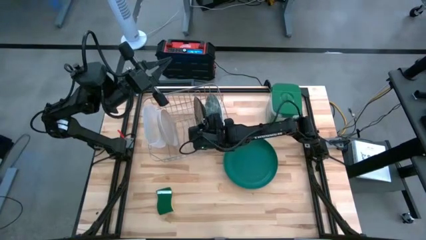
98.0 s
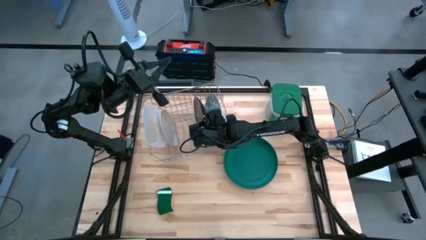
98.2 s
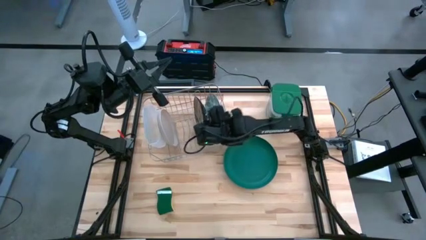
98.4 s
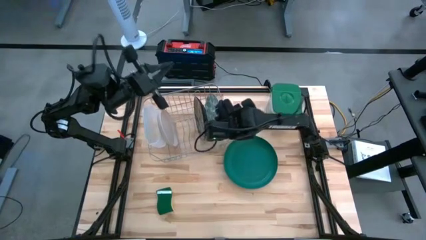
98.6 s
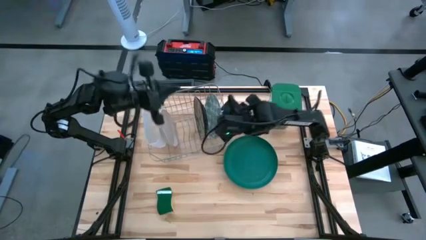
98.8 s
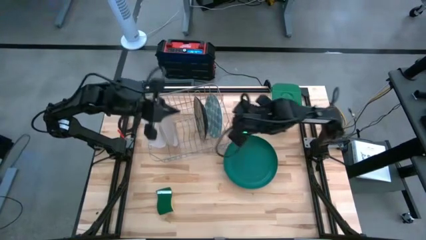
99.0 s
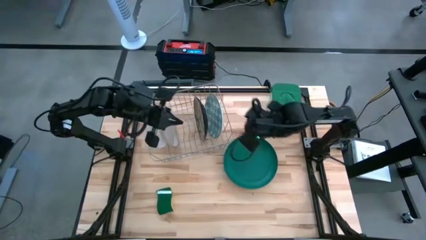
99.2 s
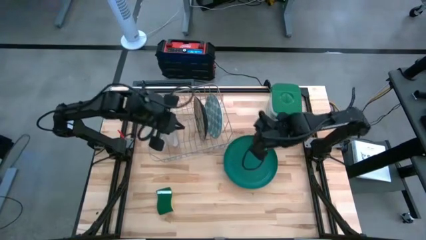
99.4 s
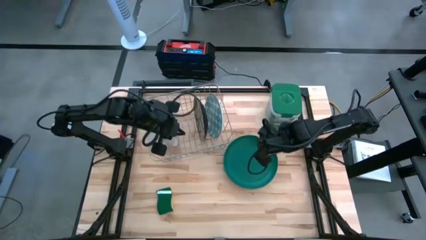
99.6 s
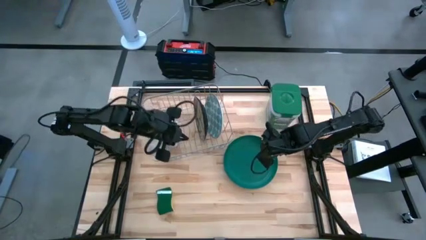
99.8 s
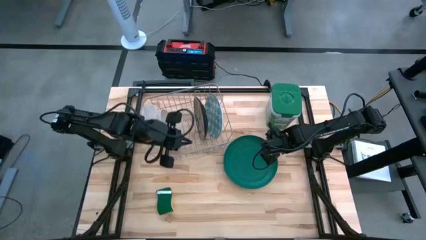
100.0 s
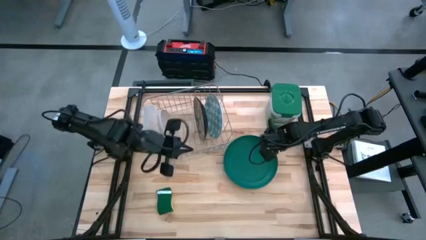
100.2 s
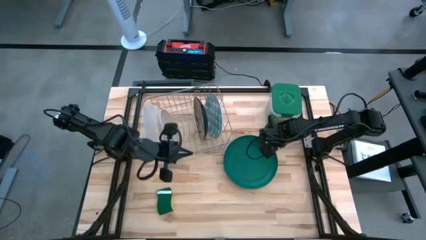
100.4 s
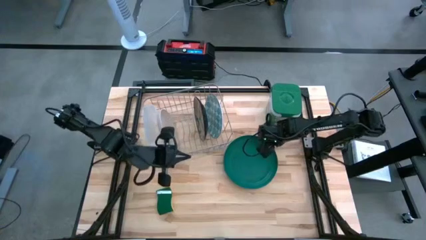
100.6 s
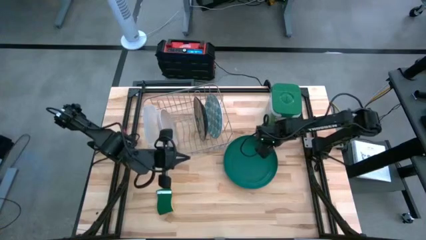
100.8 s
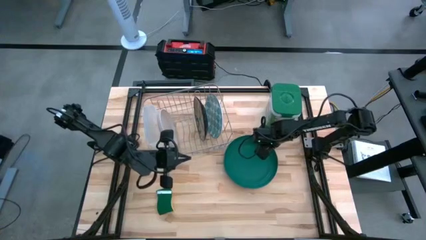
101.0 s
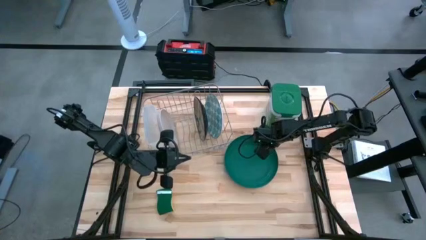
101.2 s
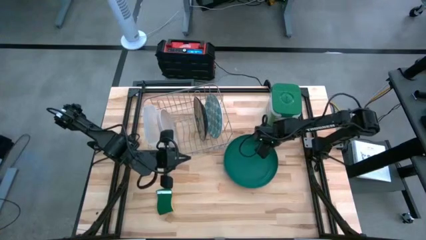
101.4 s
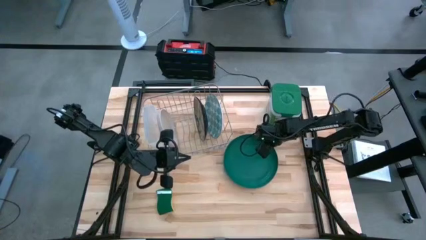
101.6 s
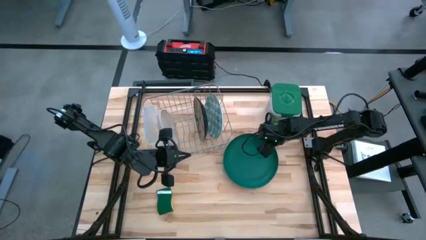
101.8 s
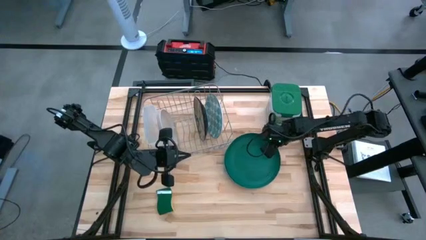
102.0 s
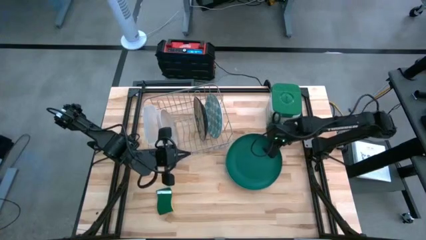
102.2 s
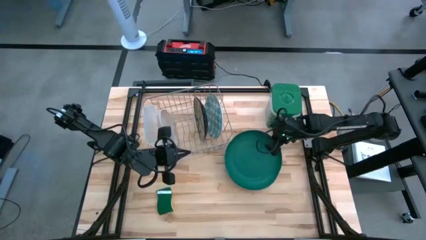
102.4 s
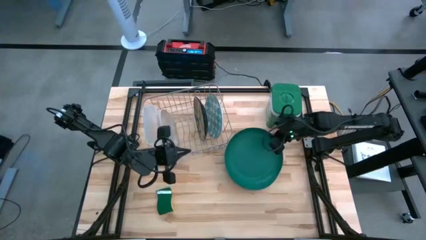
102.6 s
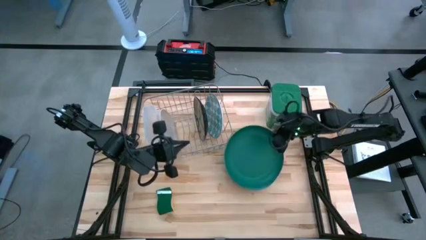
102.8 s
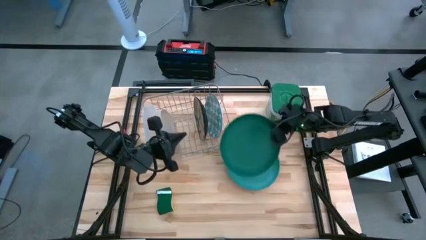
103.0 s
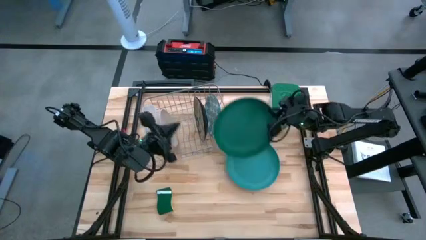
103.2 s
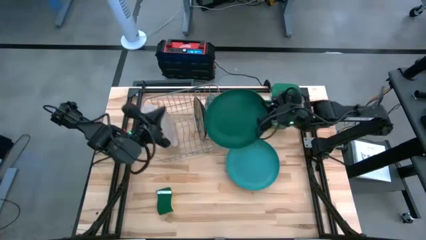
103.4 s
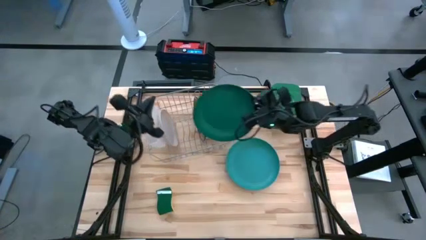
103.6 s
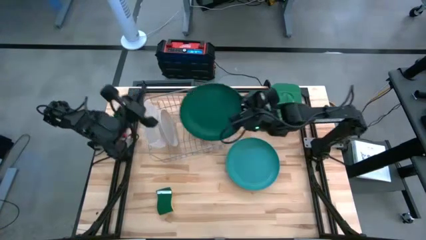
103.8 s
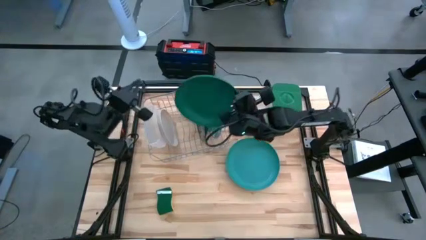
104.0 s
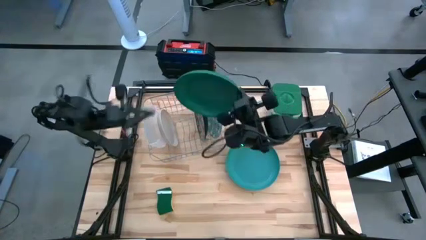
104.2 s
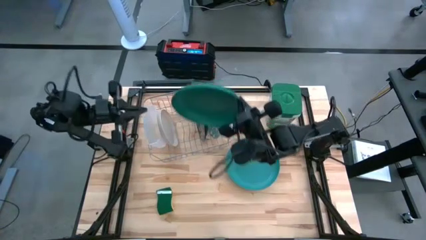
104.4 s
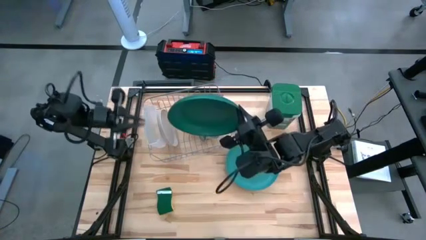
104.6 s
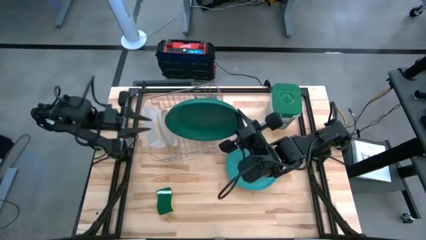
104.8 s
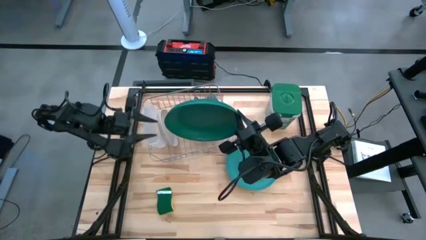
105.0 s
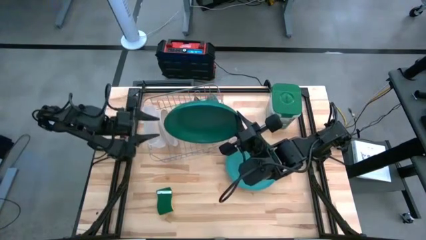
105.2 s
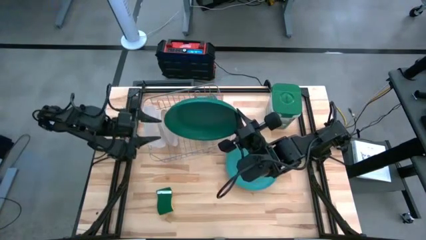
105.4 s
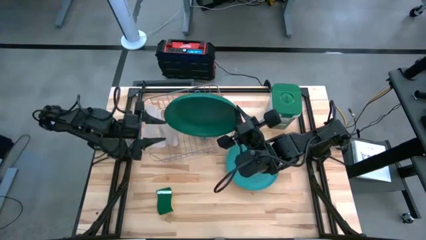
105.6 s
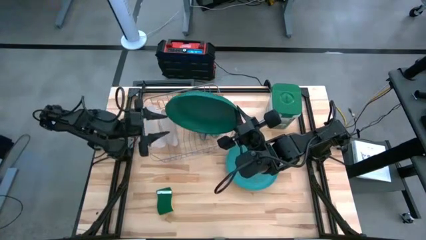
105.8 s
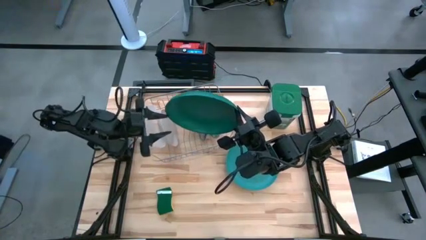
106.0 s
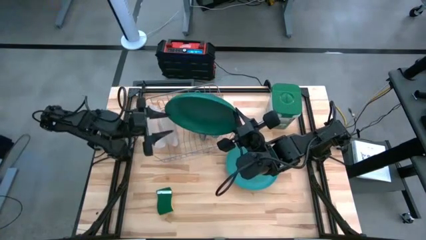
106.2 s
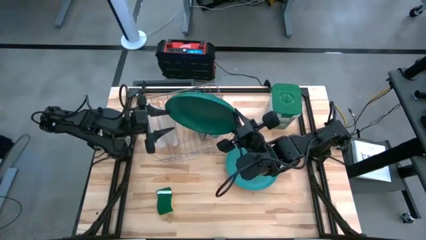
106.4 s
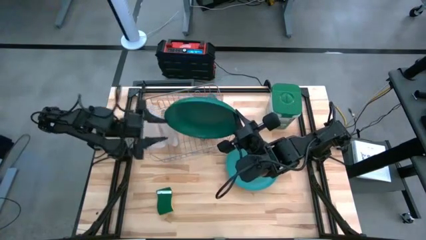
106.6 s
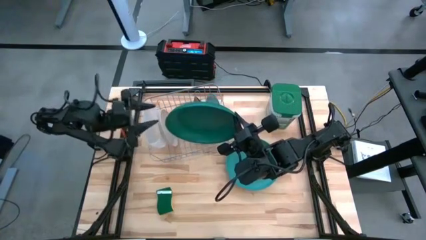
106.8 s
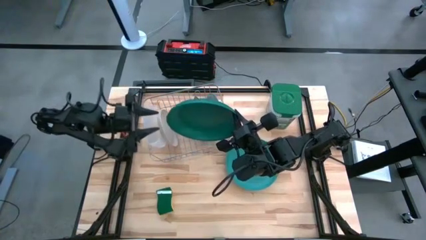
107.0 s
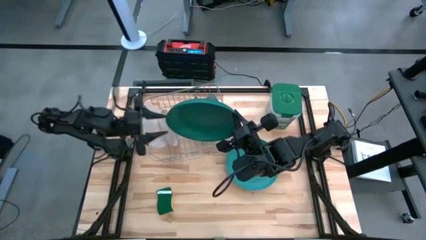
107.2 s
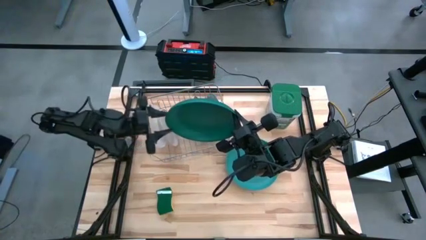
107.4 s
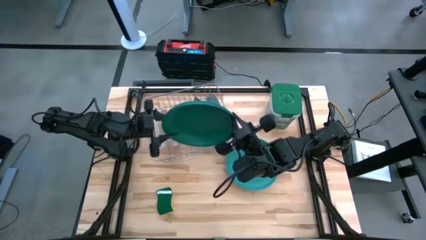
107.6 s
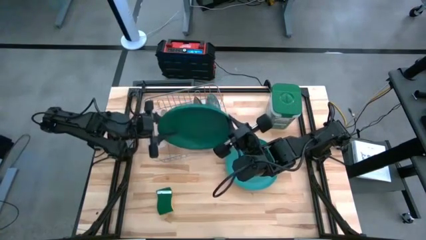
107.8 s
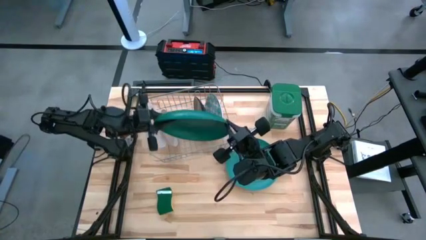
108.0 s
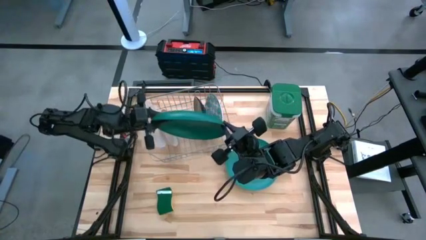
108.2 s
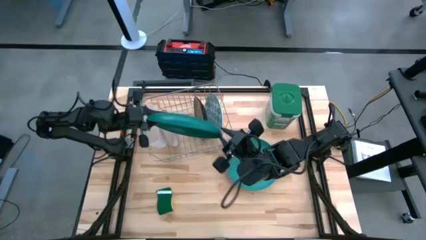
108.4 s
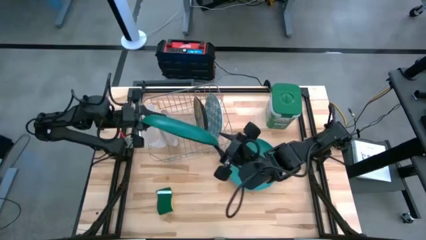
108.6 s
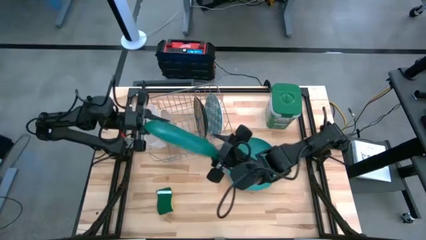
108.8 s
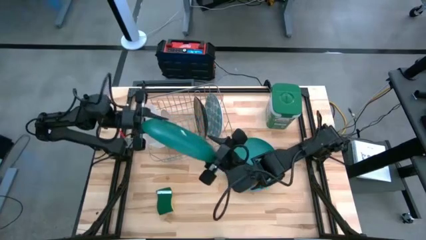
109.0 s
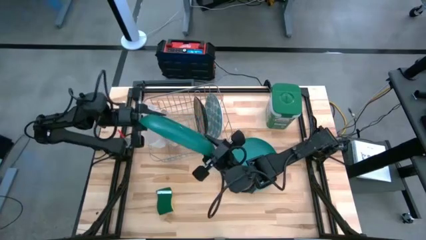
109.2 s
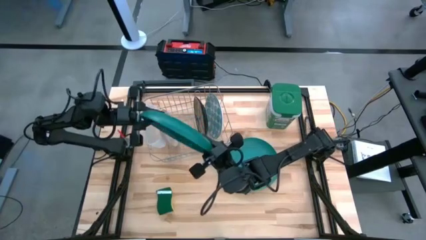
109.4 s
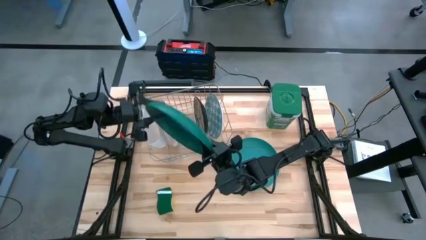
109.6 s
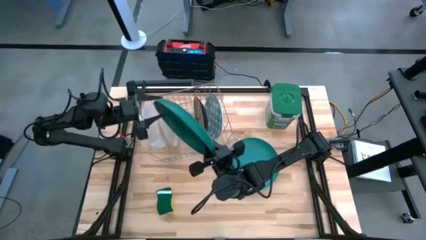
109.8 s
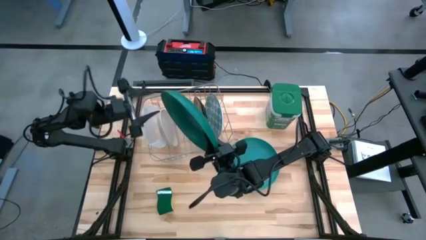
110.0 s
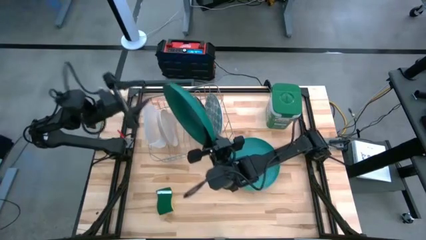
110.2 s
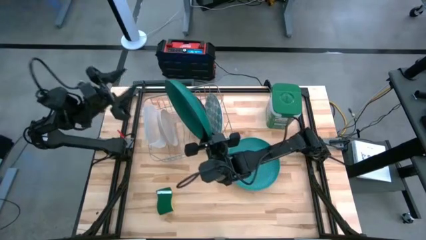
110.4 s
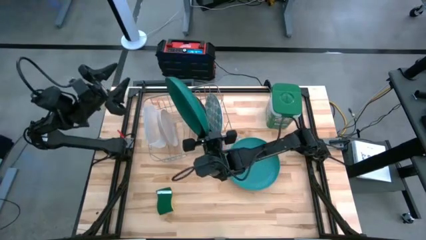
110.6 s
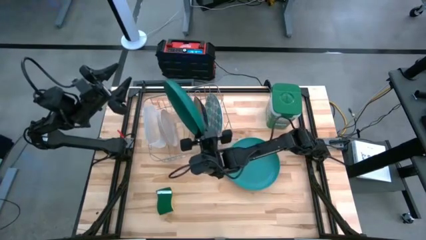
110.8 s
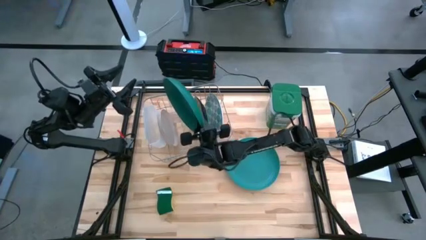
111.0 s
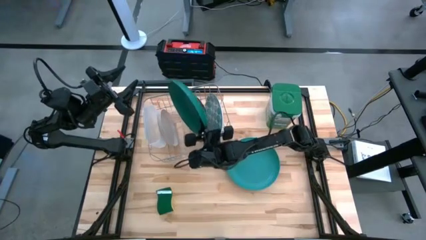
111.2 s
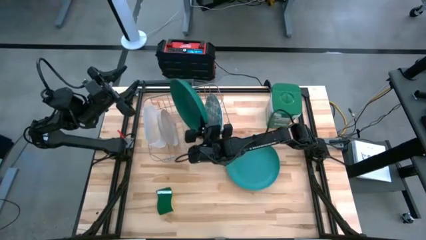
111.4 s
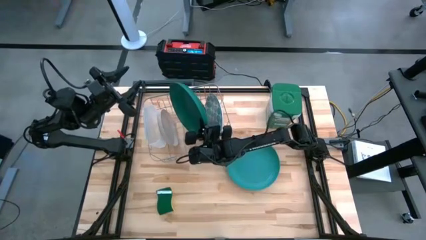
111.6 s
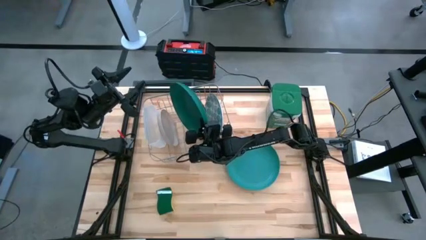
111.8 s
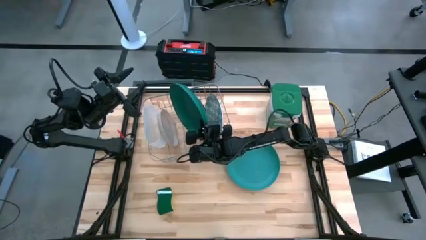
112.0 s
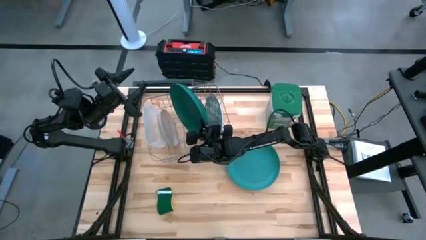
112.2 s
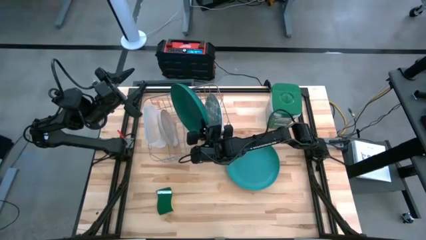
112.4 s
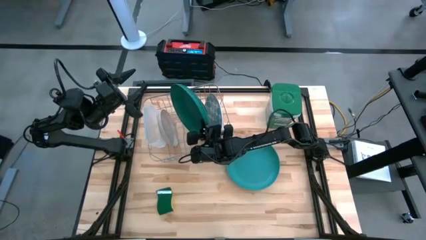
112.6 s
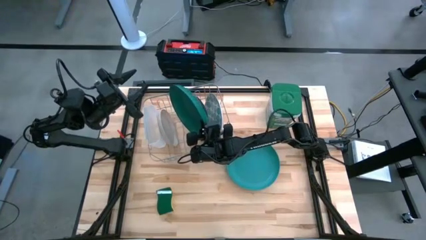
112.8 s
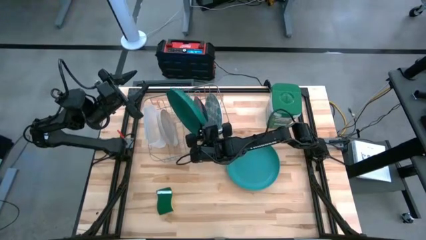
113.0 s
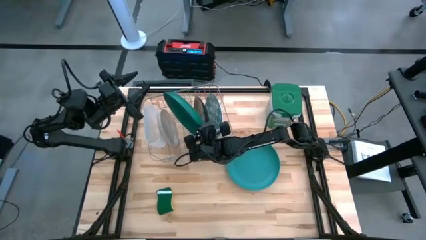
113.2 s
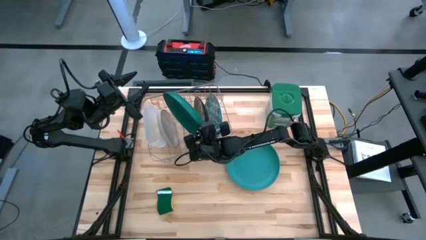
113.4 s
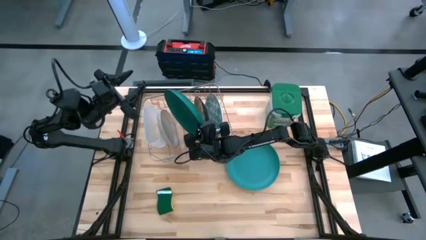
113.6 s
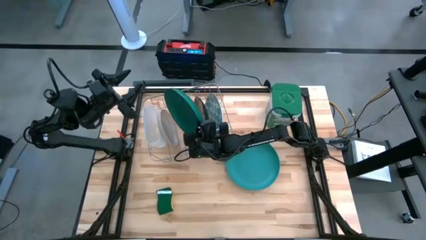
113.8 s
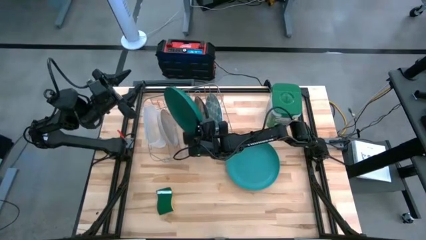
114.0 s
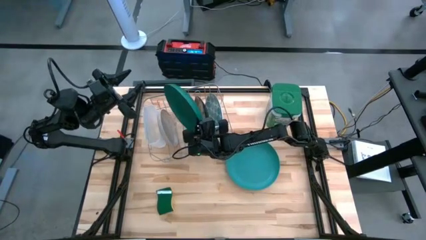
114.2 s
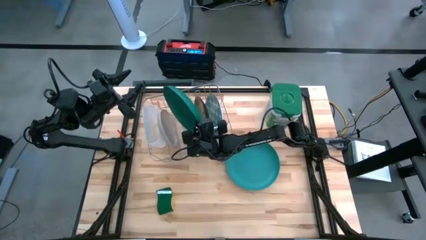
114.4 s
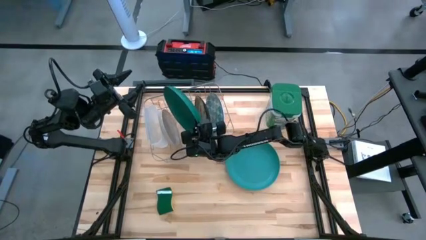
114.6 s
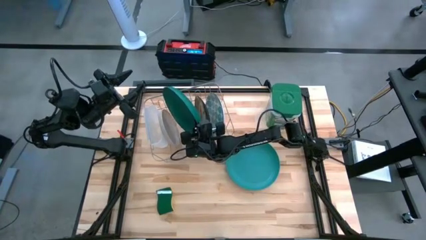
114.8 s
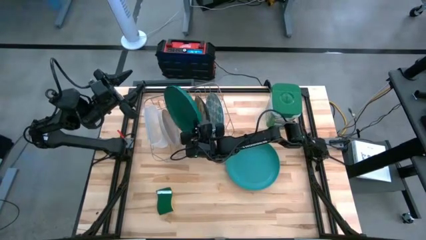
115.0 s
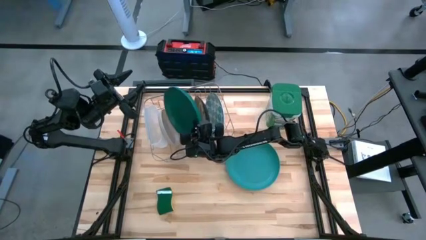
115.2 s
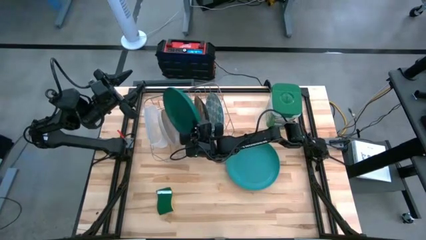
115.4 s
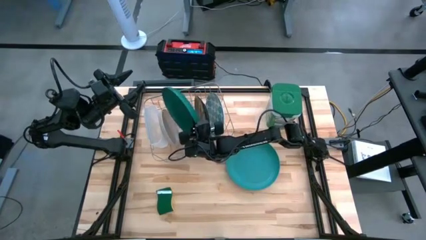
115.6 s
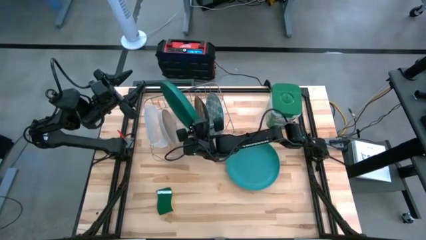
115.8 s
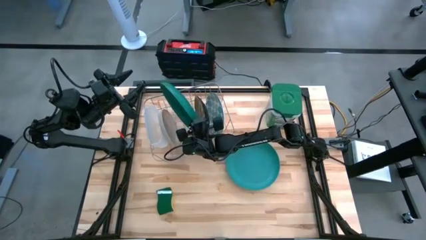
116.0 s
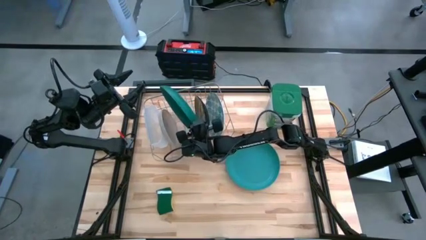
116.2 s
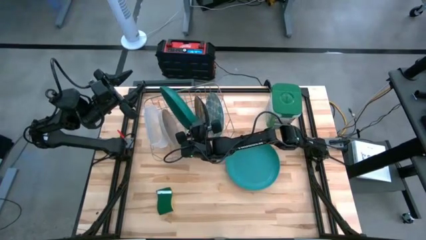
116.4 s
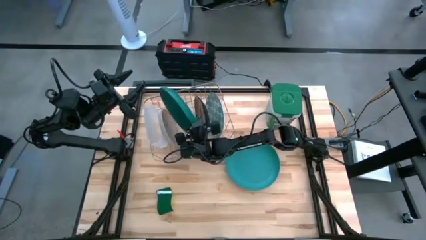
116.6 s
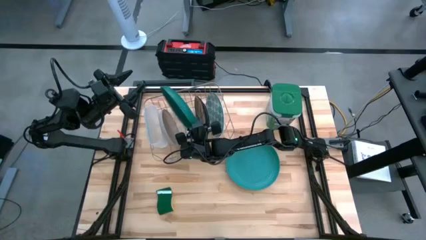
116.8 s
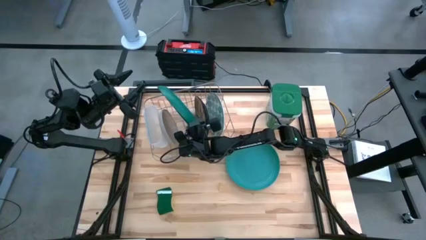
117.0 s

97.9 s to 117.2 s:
Task: Sort dishes
Put the green plate on the dish rack
